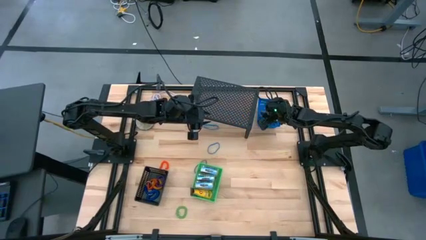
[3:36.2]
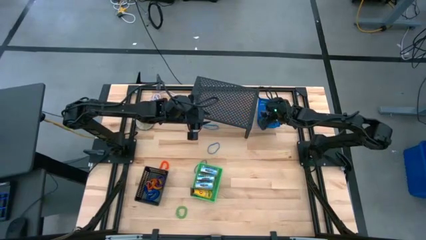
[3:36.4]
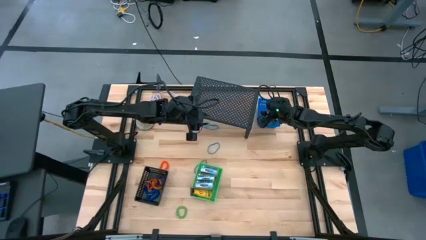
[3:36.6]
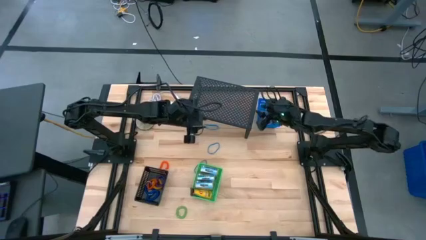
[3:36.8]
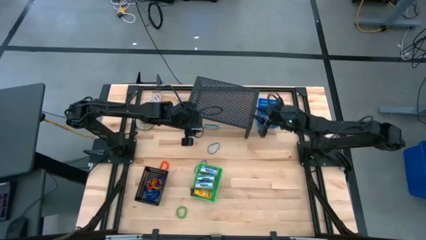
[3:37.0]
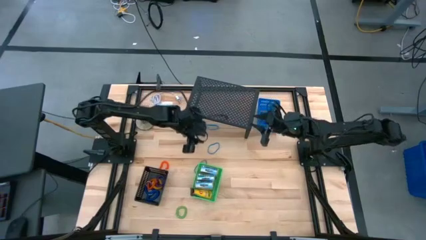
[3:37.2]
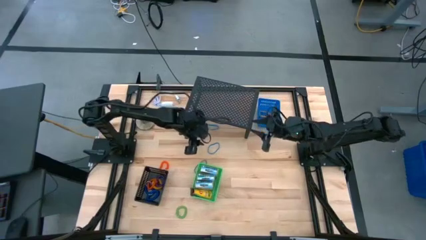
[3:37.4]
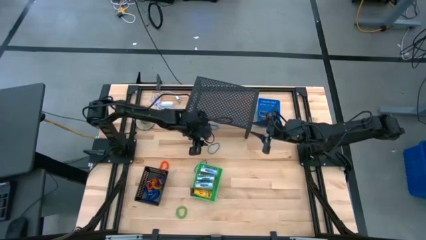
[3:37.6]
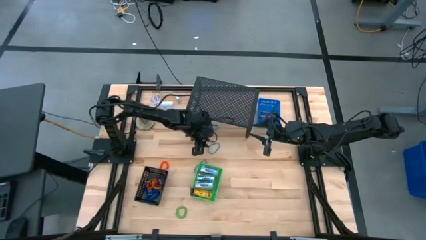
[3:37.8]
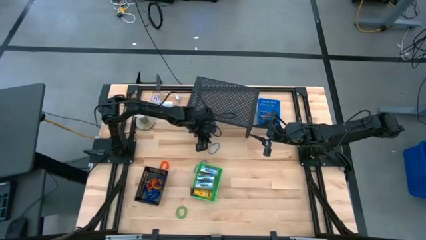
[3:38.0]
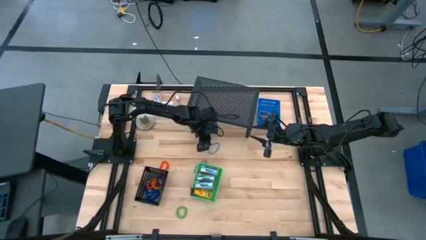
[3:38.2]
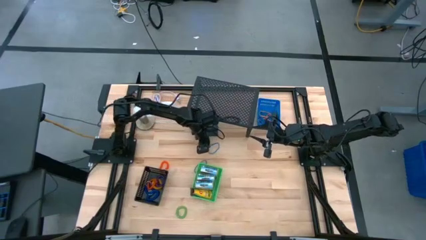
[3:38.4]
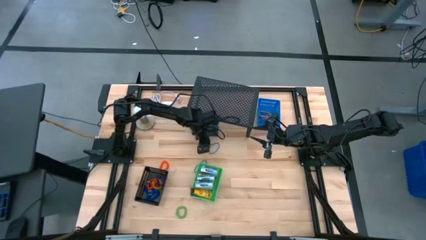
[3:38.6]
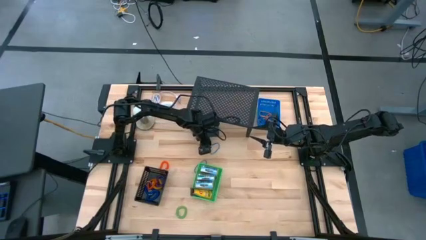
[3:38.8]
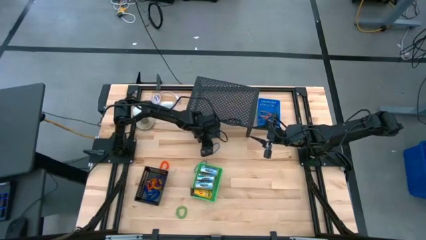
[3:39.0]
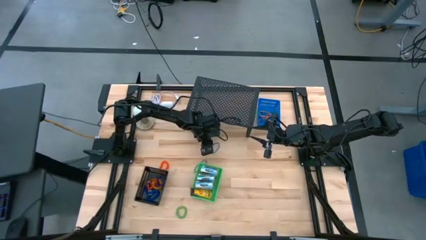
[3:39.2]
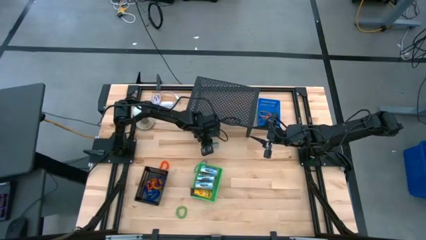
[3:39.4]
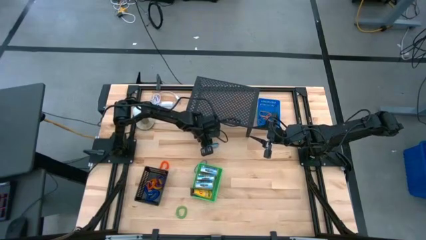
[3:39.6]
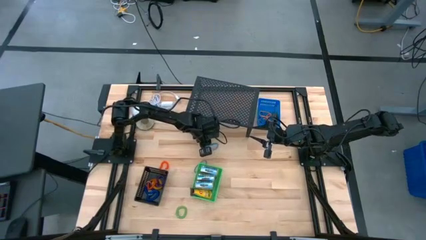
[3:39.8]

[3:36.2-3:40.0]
Task: Pick & Place Office Desk Supplies
Put the blue rubberband into the blue bin

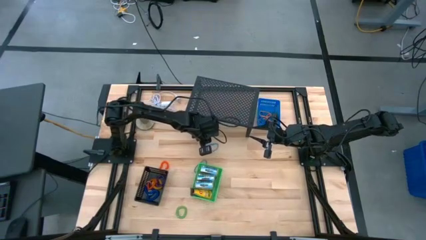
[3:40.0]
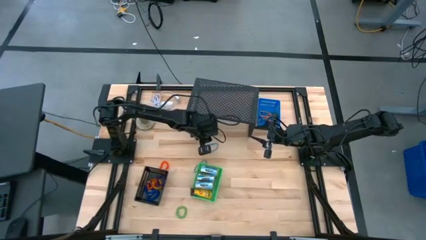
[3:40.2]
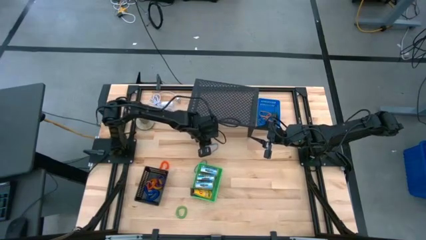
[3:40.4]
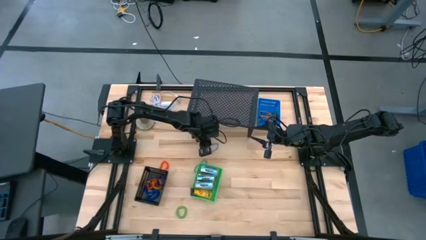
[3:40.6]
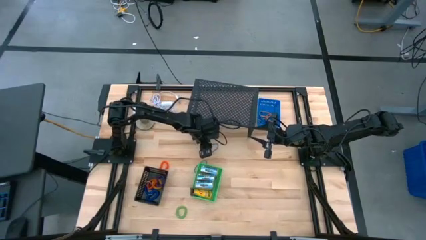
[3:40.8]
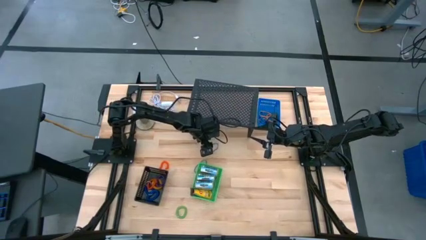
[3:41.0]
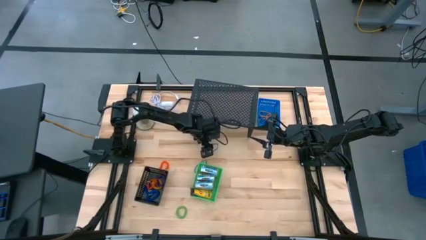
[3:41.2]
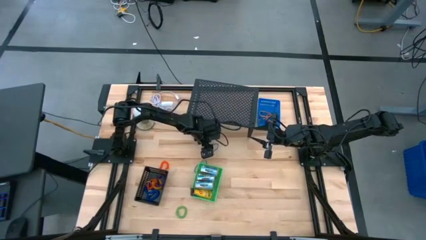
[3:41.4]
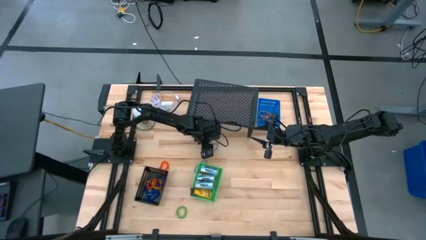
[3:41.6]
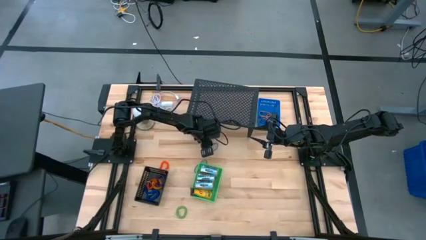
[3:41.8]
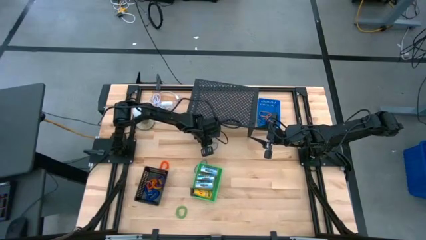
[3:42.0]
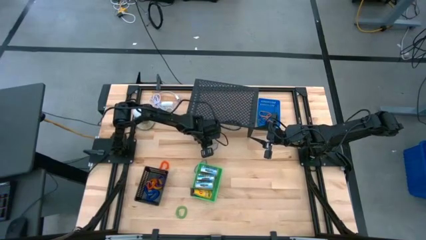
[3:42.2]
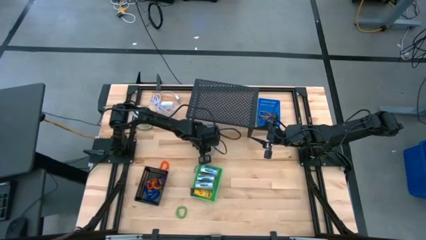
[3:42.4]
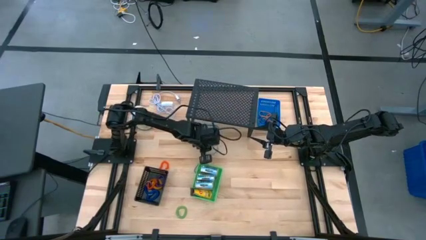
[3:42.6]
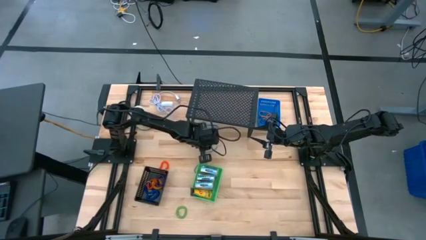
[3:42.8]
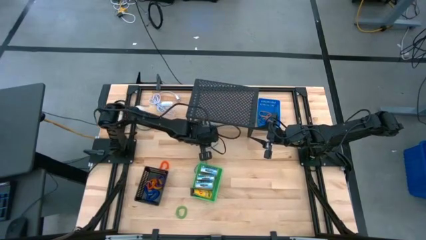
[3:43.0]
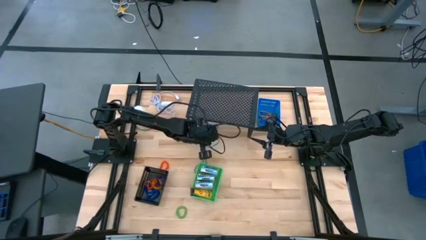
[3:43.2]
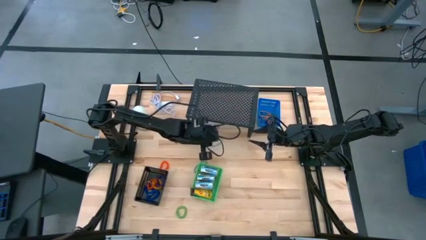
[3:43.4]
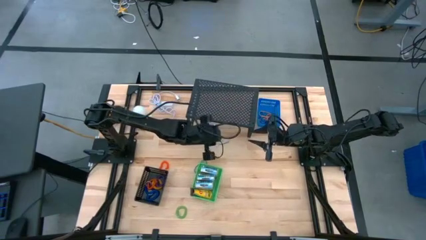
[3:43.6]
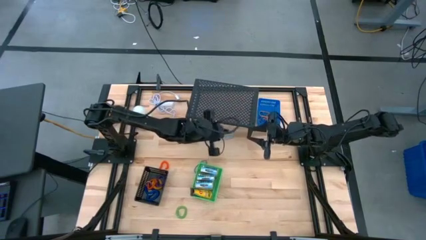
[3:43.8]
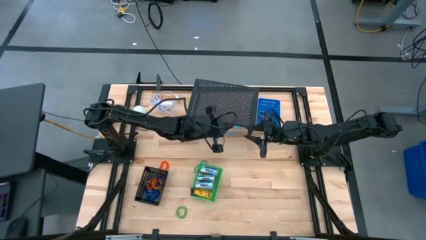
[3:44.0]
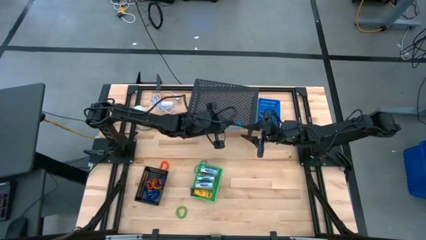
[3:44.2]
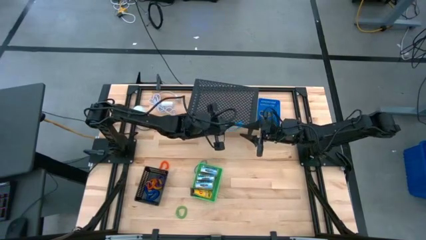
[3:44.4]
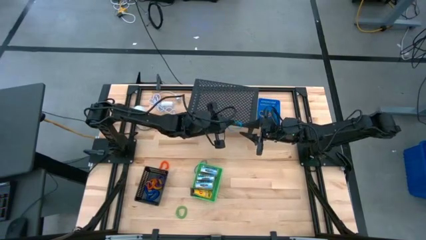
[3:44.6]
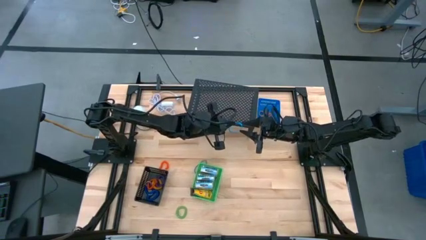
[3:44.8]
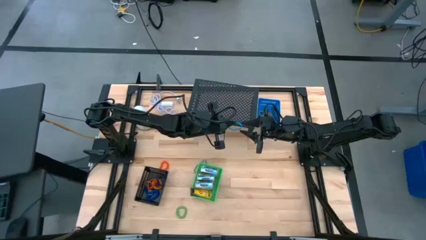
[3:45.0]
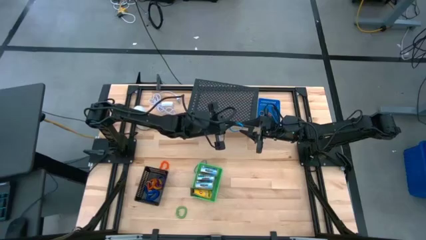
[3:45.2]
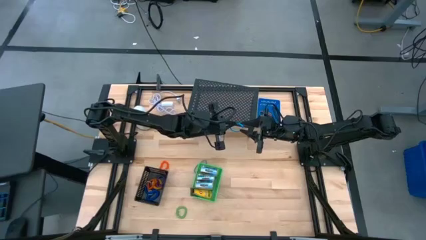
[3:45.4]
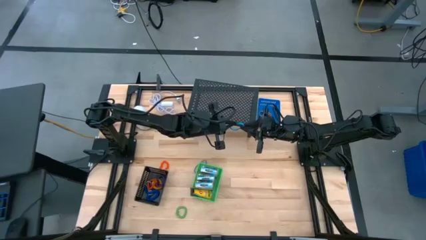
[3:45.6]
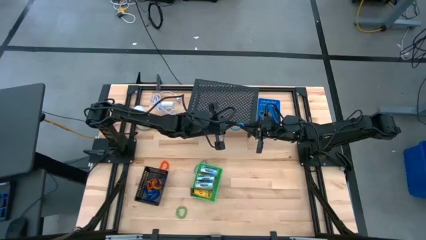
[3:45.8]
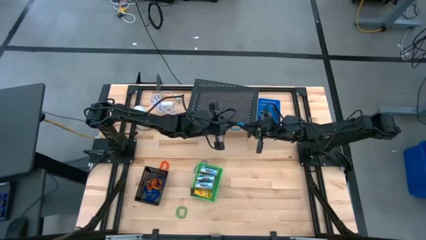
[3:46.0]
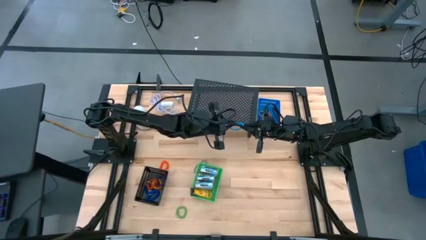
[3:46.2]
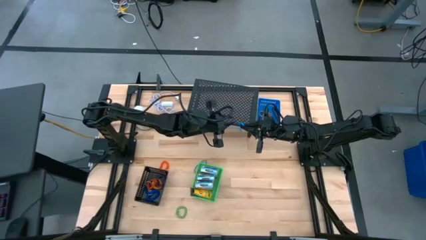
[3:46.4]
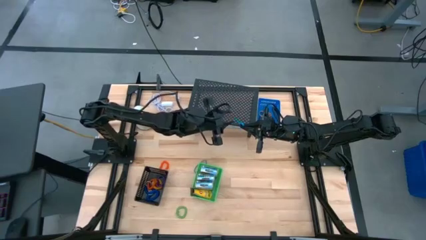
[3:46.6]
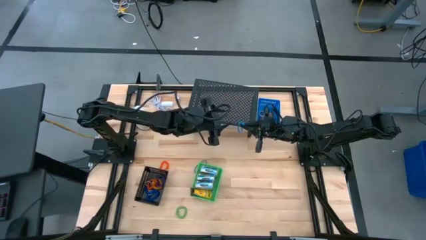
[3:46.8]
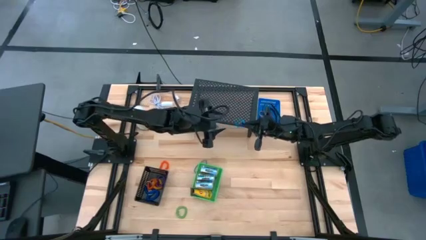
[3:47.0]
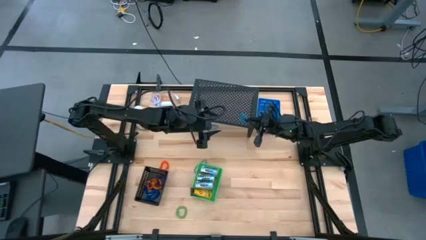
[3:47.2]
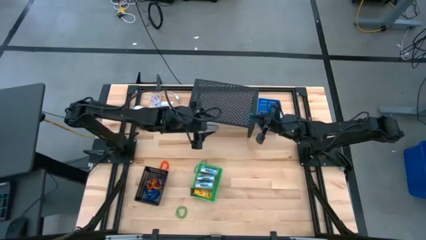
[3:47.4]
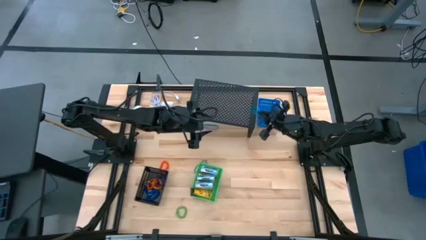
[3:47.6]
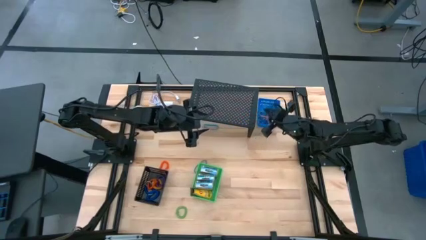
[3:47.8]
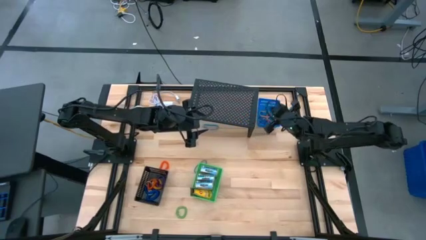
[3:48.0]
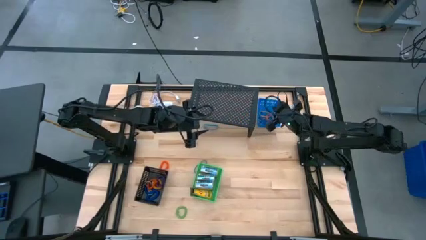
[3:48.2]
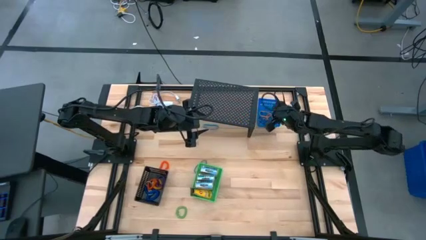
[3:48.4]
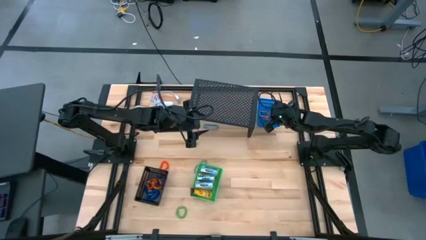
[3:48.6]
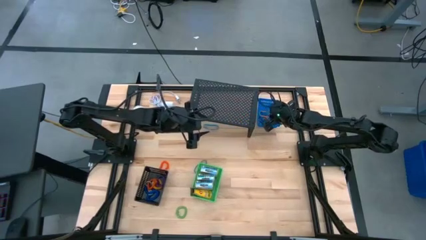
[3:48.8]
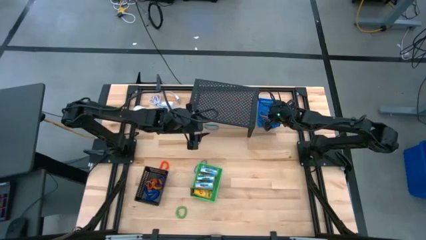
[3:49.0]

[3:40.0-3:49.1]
Put the blue rubberband into the blue bin

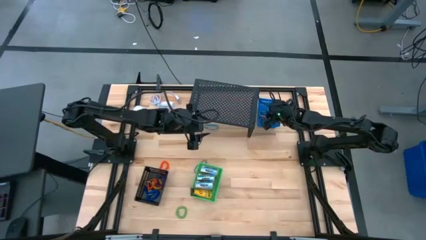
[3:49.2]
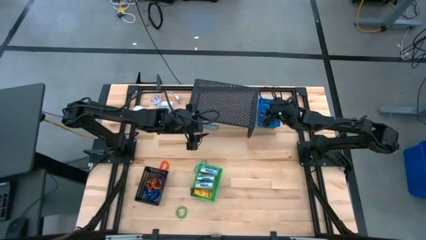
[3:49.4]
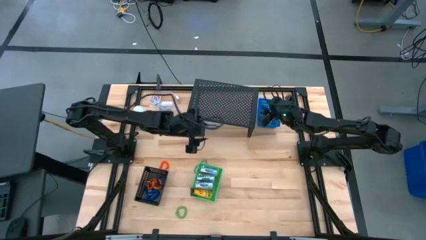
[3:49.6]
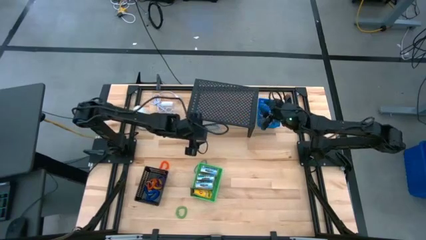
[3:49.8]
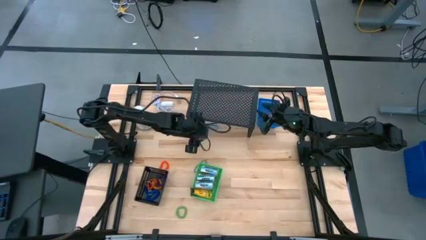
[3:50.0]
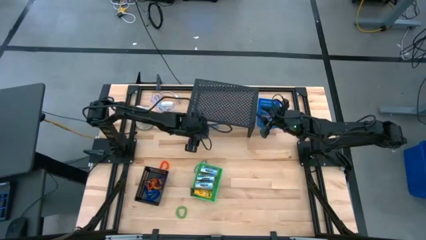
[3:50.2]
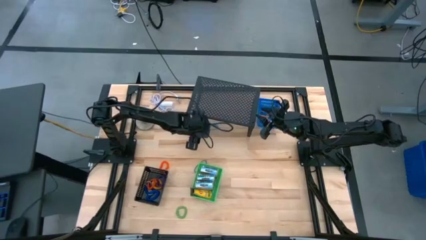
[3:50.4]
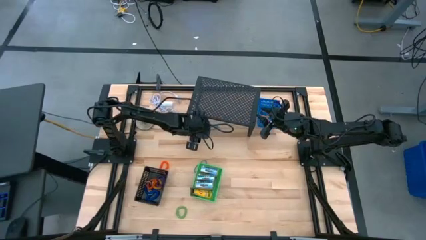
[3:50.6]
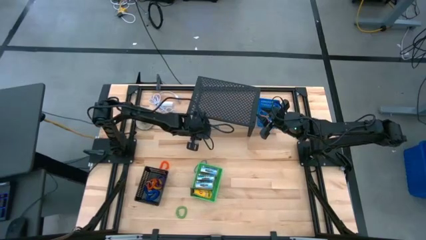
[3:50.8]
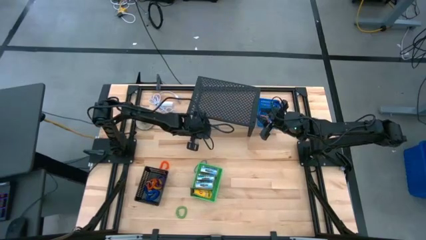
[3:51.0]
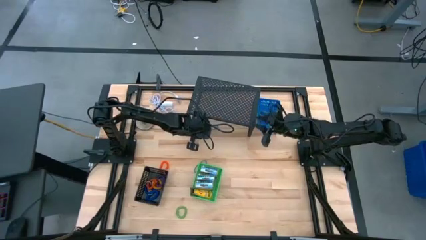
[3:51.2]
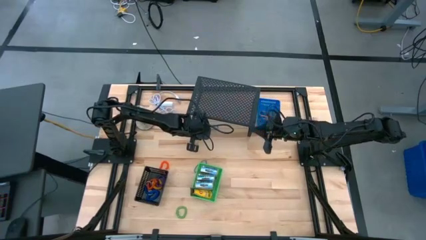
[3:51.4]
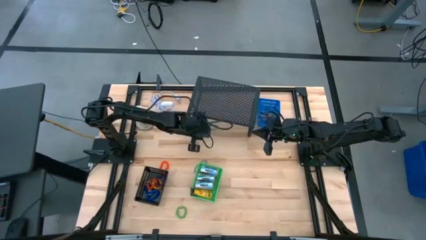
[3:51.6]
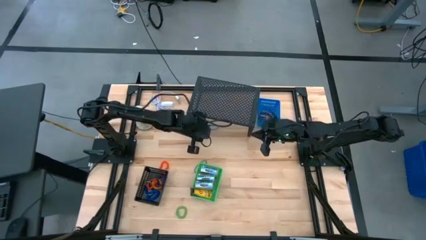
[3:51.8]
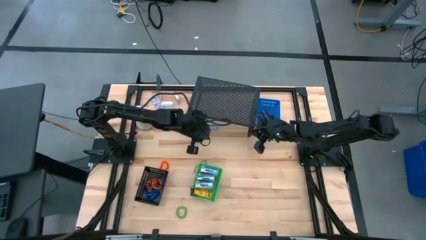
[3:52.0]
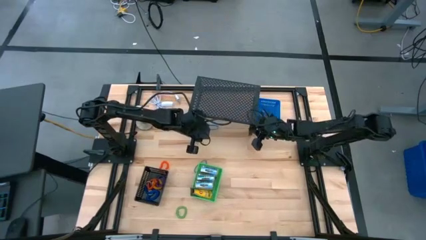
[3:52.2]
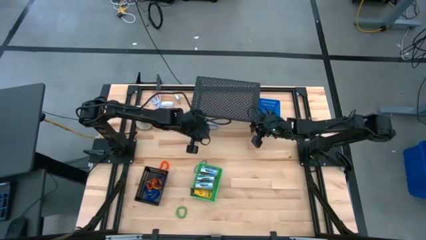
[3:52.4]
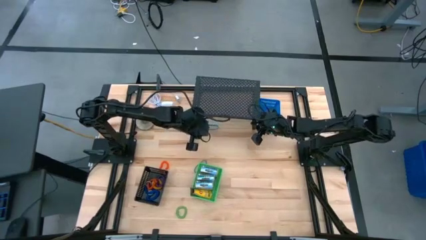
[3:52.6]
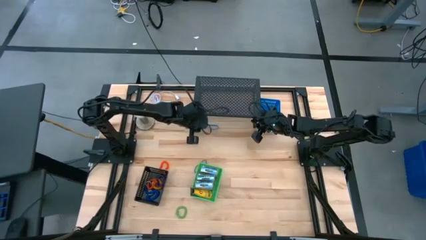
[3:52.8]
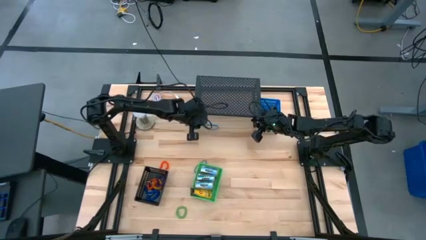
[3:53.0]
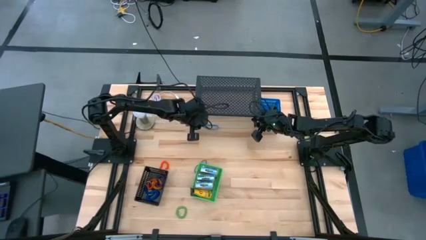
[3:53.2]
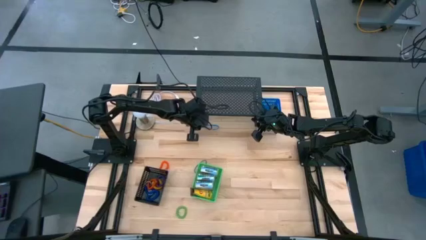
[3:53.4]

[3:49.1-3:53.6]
Adjust the shelf
